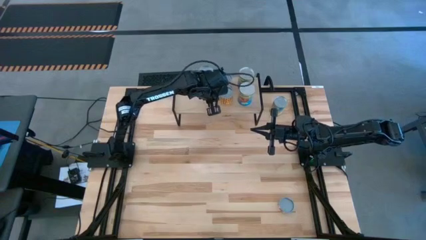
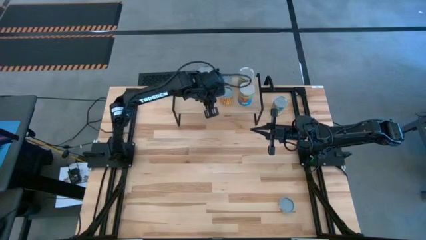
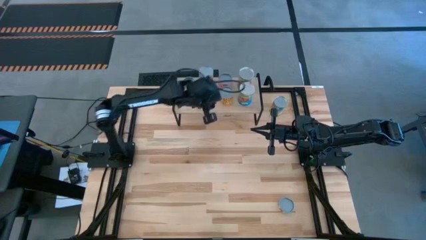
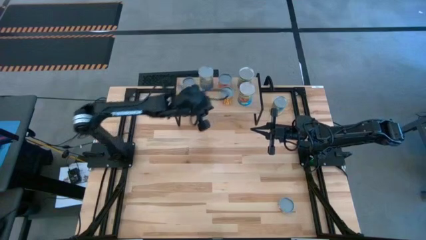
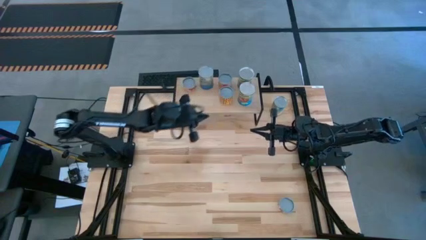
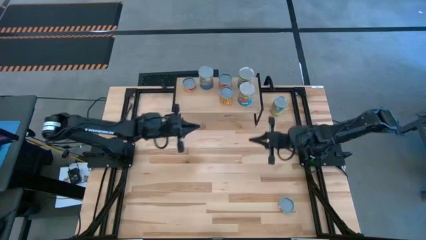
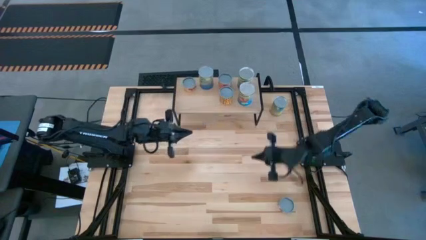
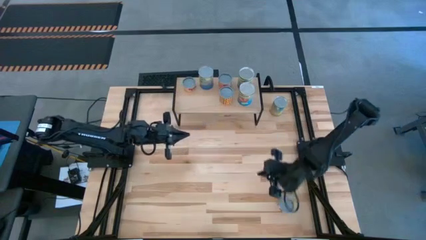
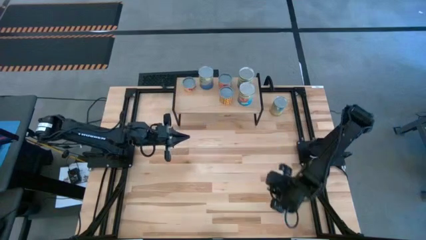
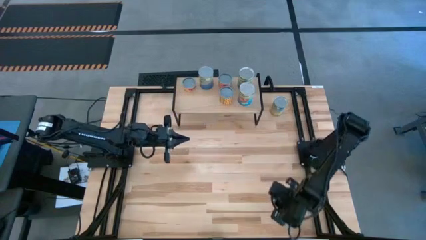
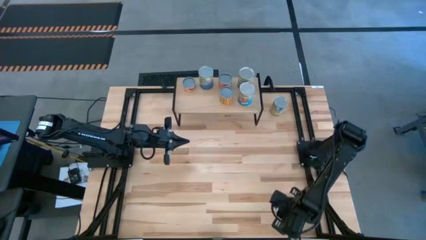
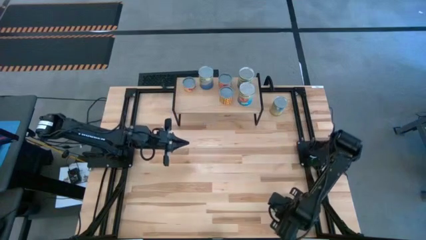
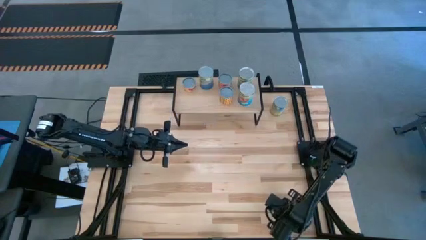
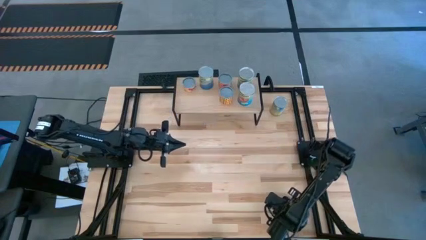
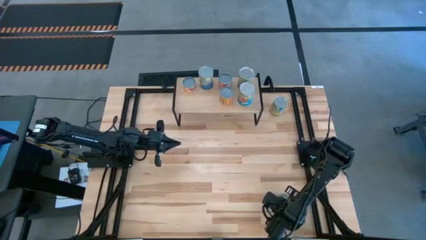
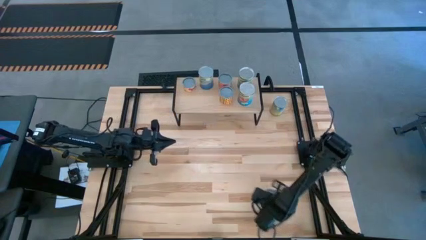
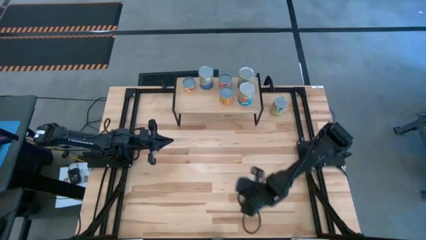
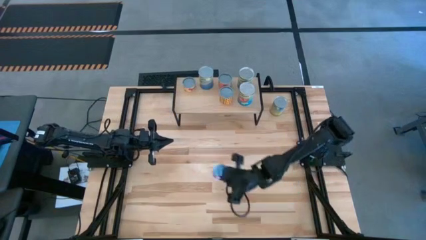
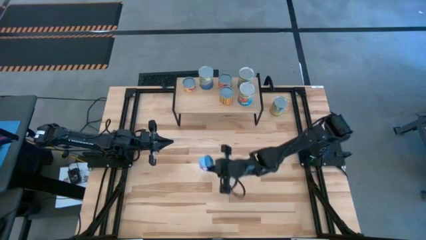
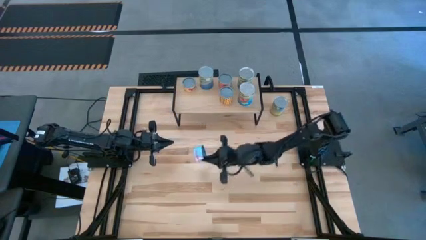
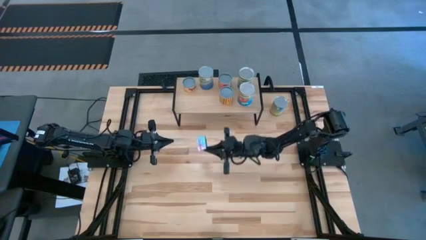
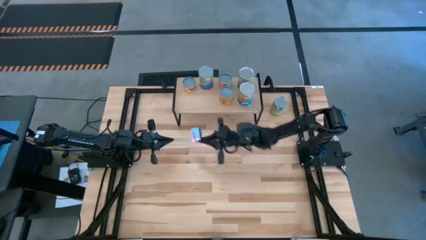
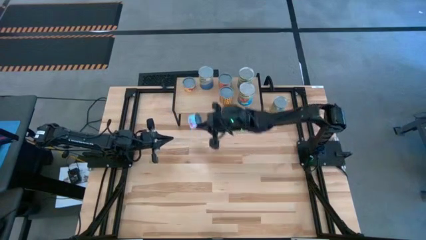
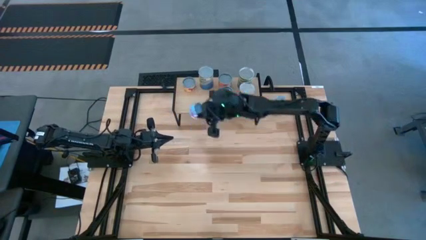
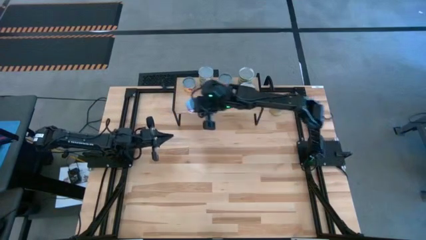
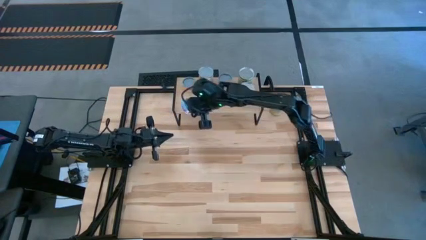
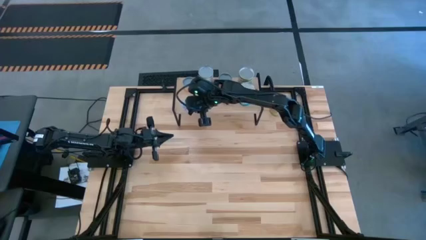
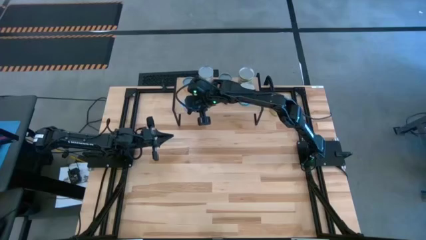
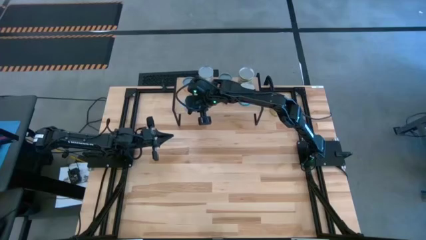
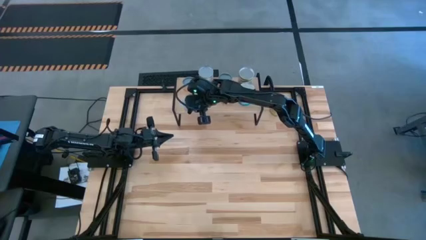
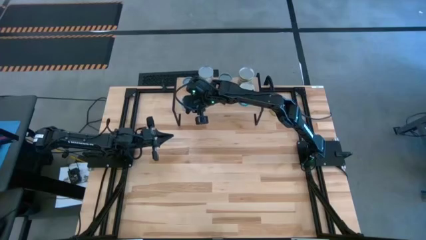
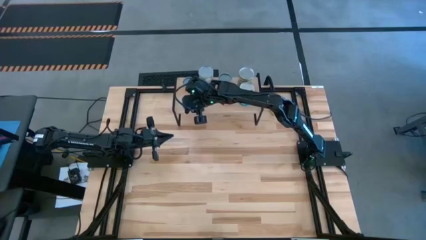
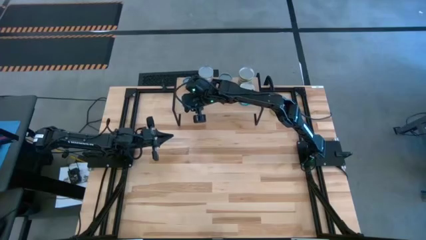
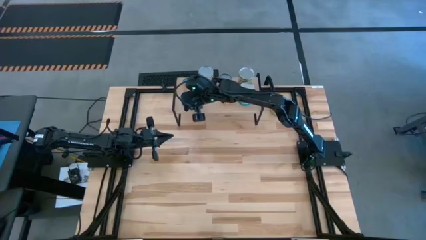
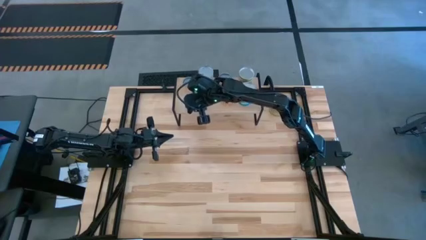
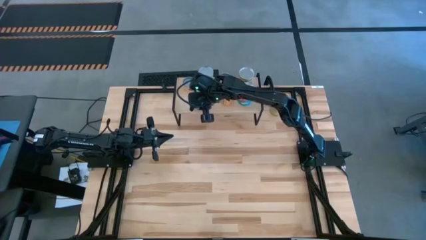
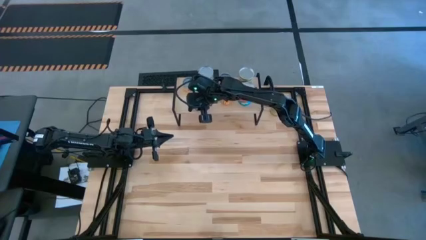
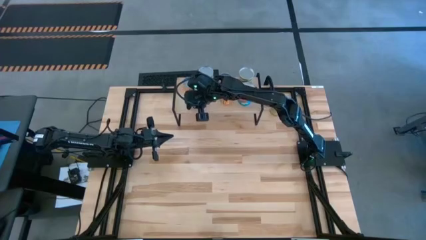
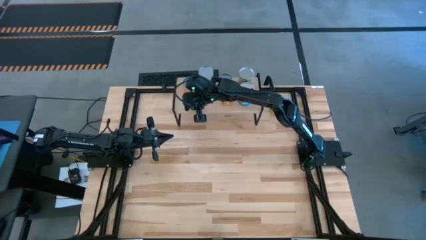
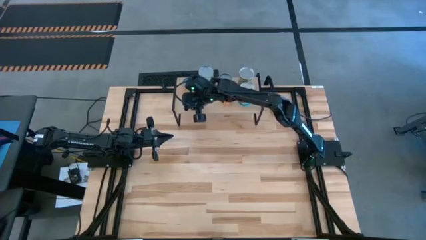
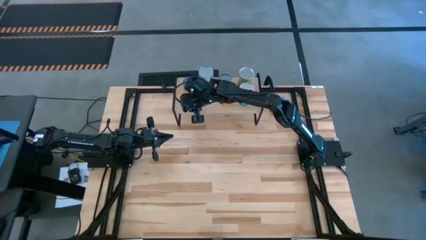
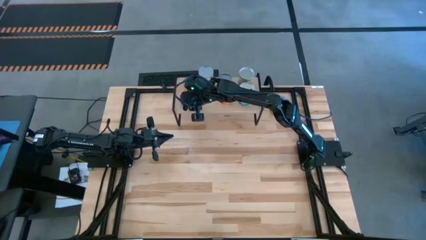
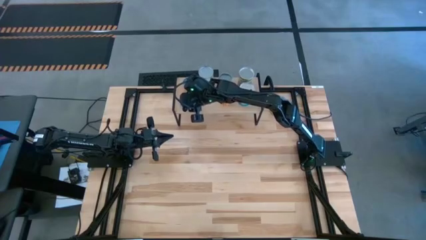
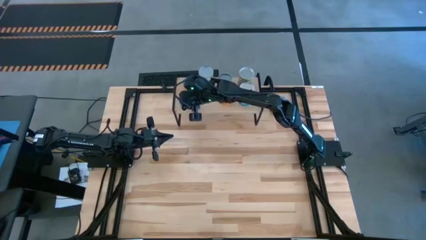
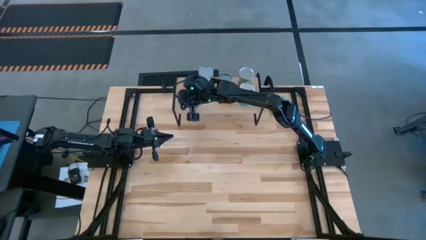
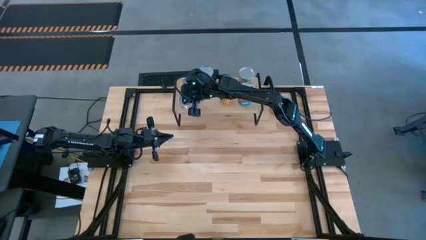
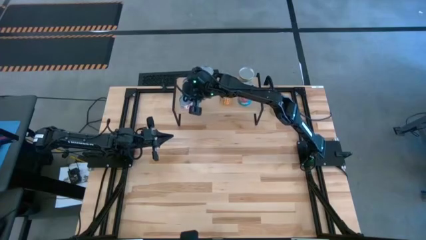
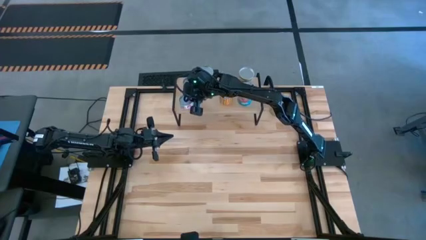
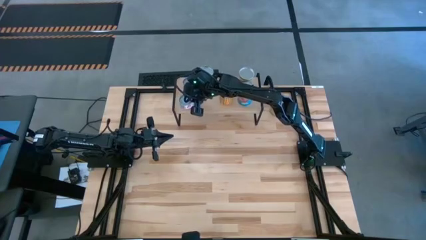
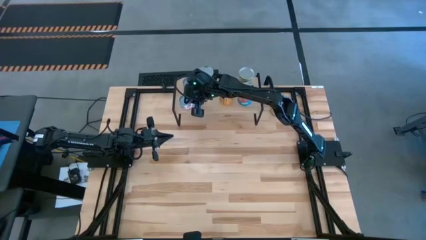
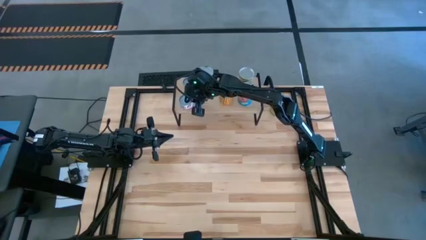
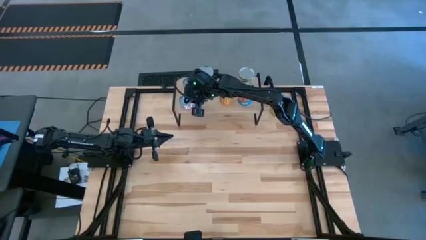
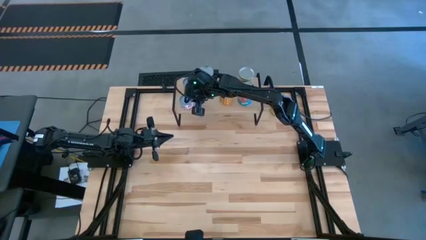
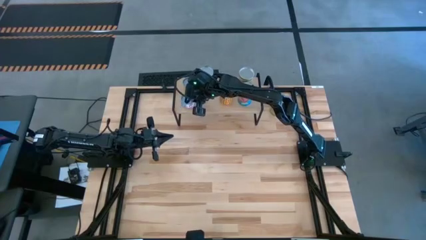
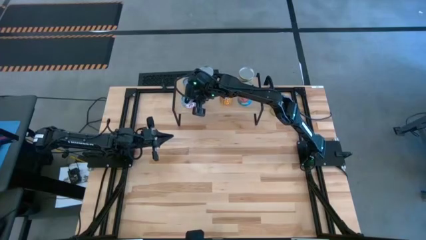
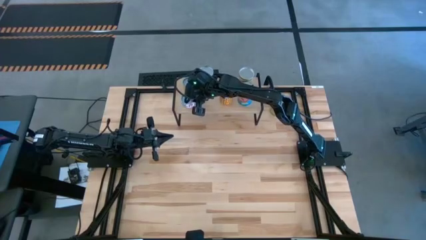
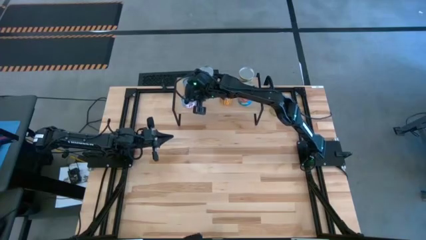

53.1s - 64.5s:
Task: Pick and place cans onto a shelf
Put the canned salmon on the shelf aligned with the canned pineapple
